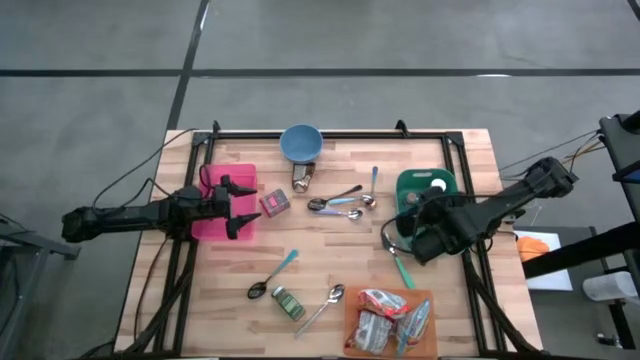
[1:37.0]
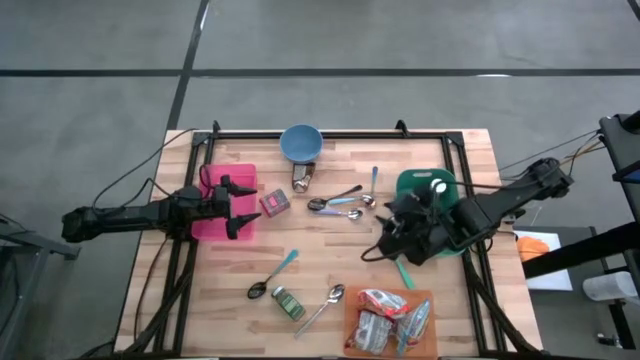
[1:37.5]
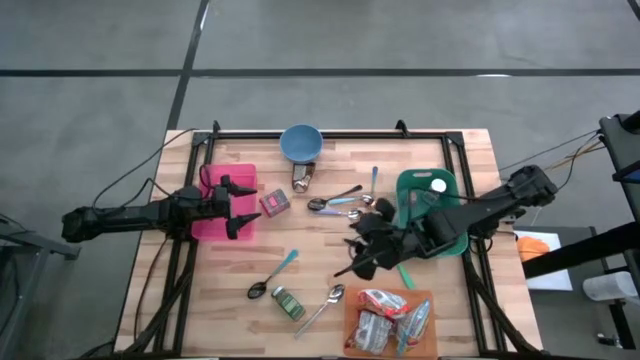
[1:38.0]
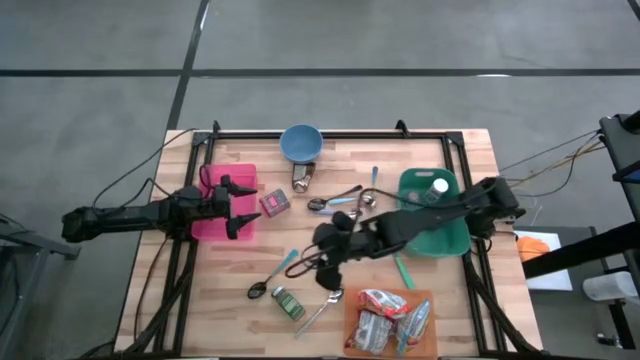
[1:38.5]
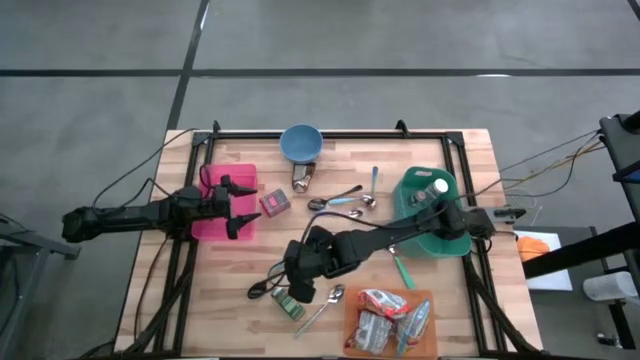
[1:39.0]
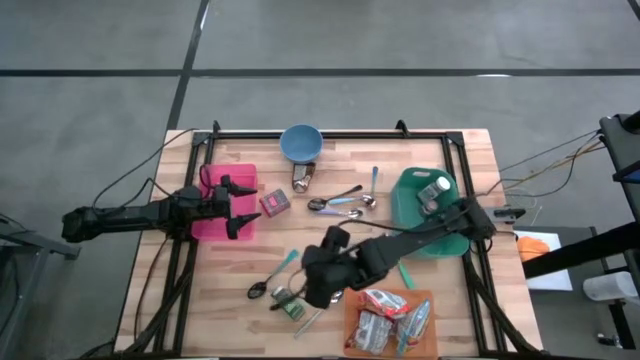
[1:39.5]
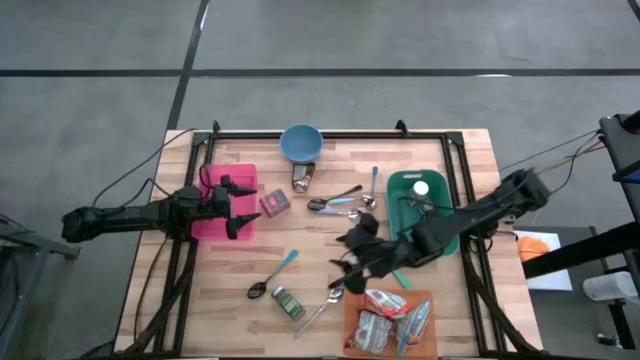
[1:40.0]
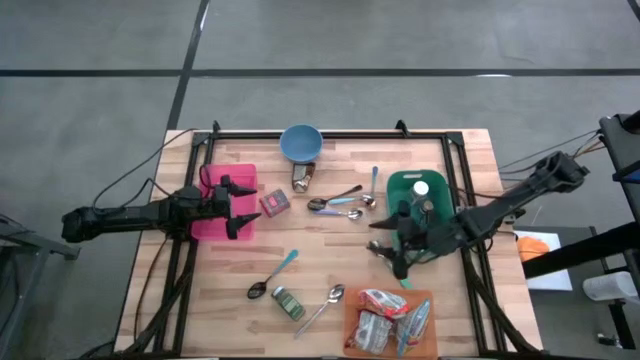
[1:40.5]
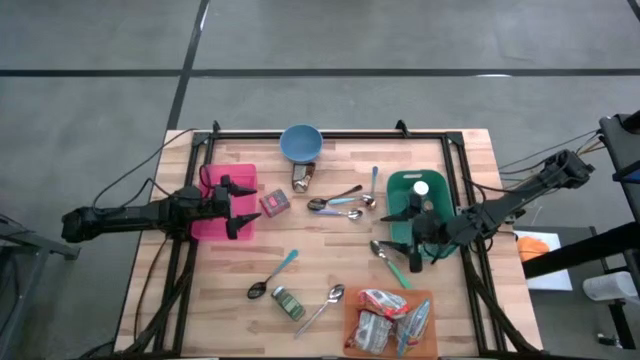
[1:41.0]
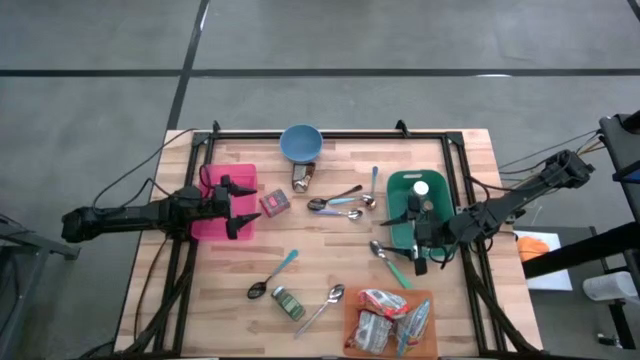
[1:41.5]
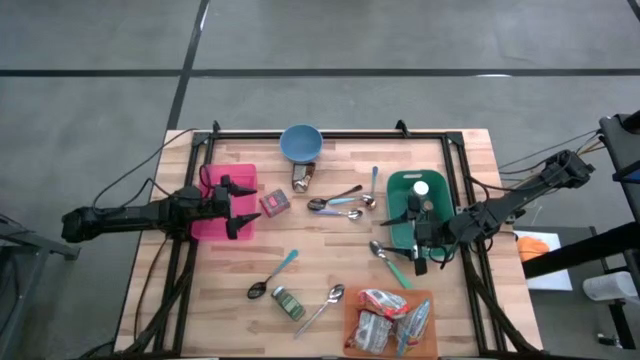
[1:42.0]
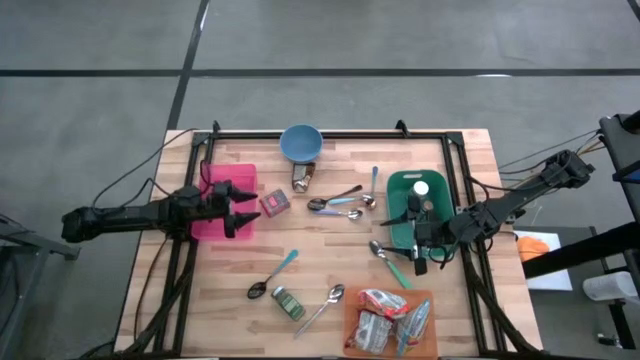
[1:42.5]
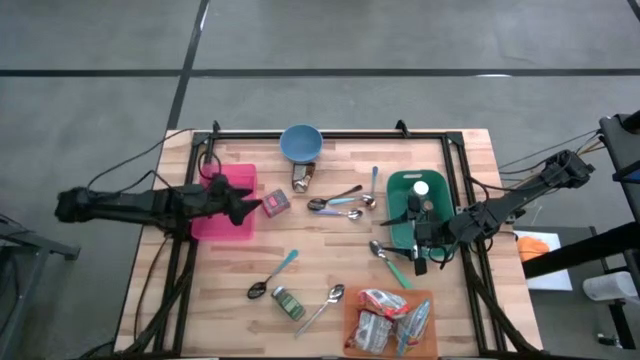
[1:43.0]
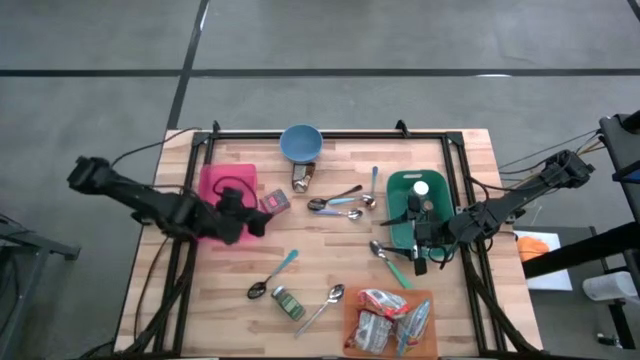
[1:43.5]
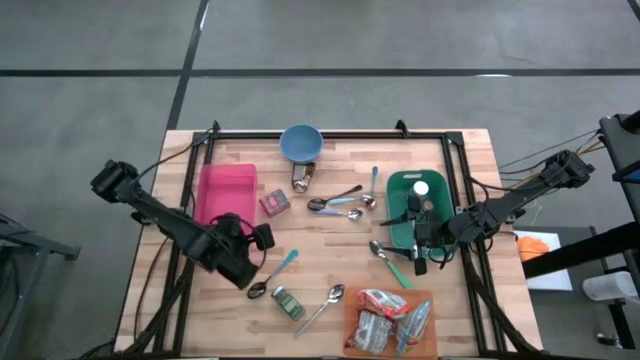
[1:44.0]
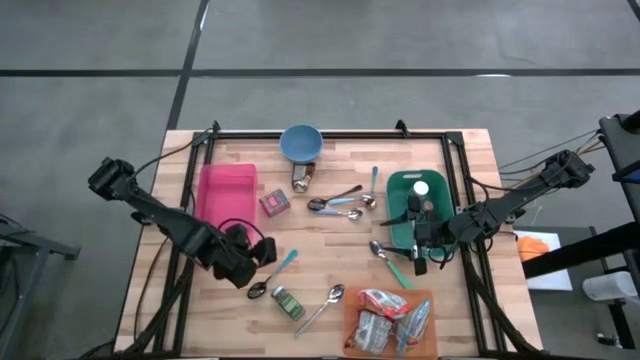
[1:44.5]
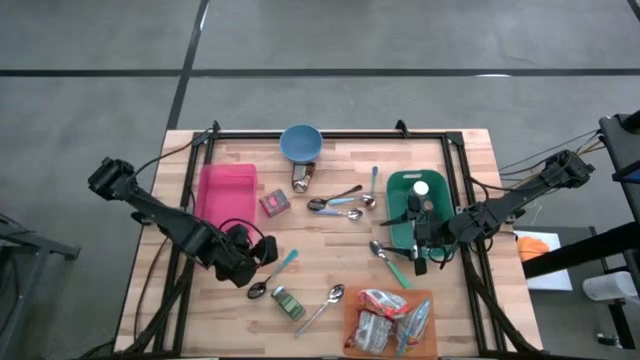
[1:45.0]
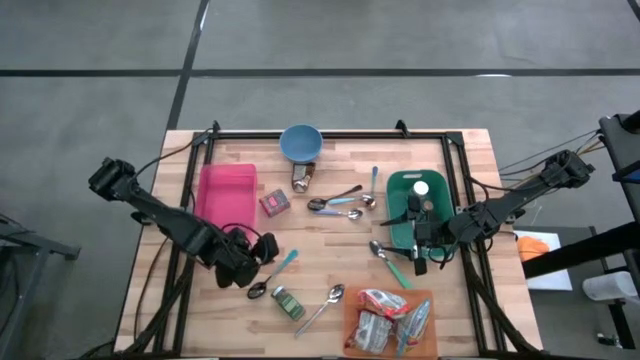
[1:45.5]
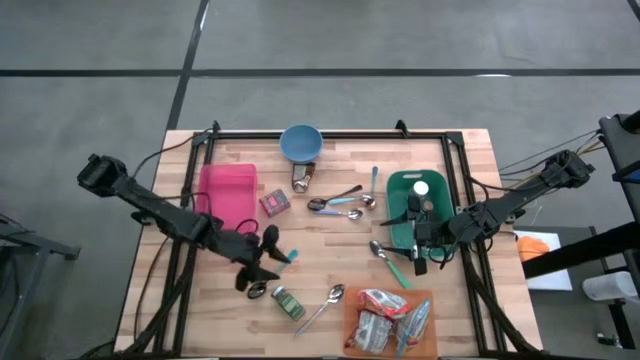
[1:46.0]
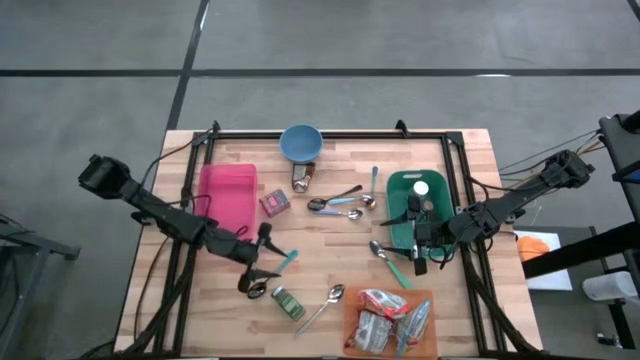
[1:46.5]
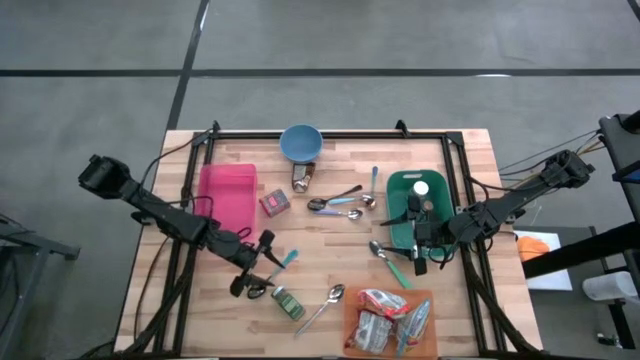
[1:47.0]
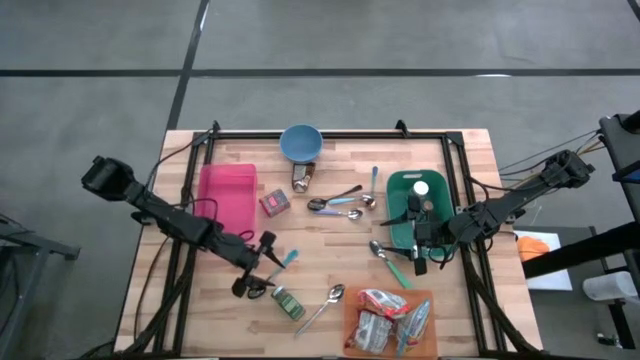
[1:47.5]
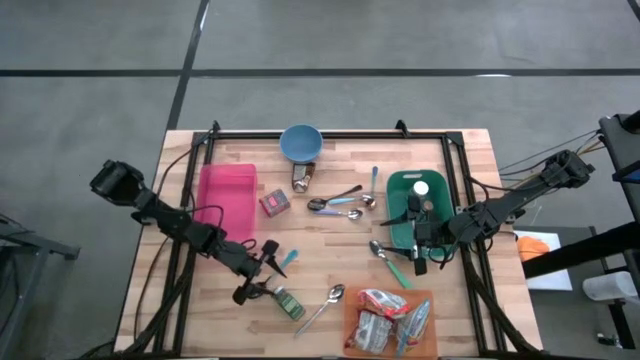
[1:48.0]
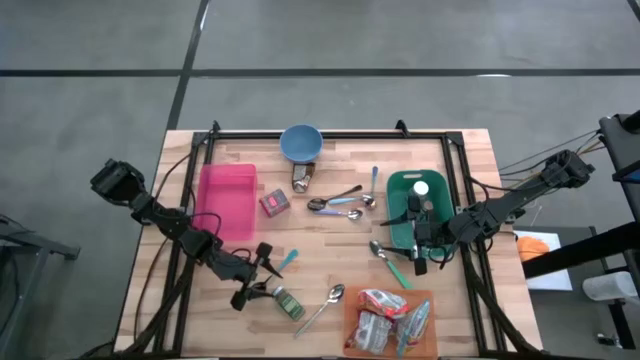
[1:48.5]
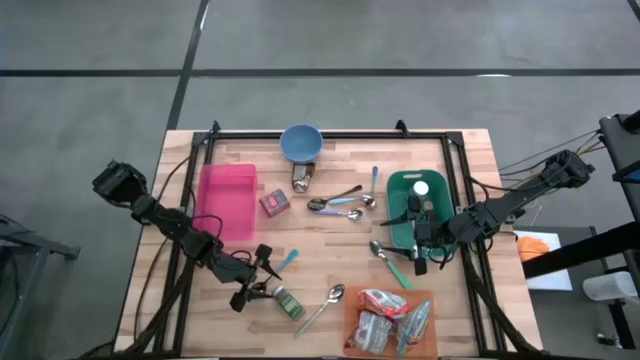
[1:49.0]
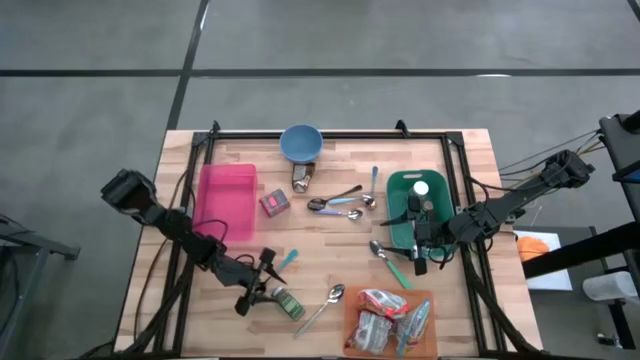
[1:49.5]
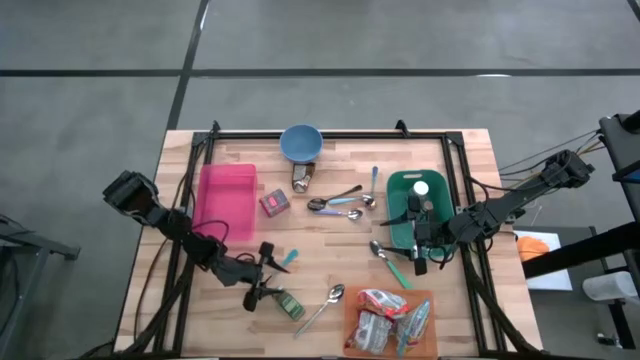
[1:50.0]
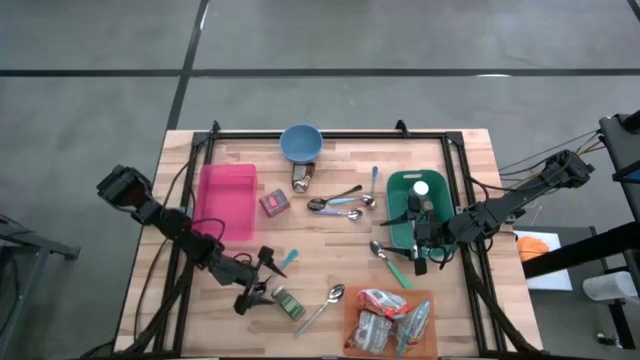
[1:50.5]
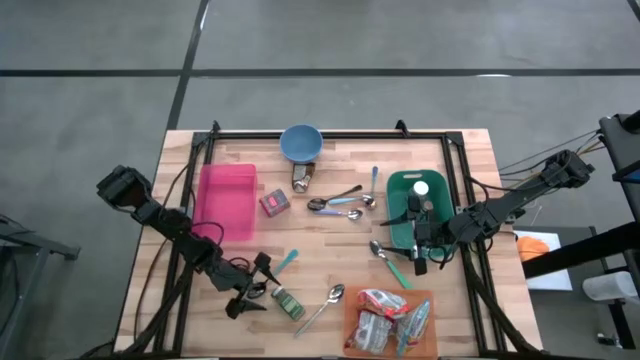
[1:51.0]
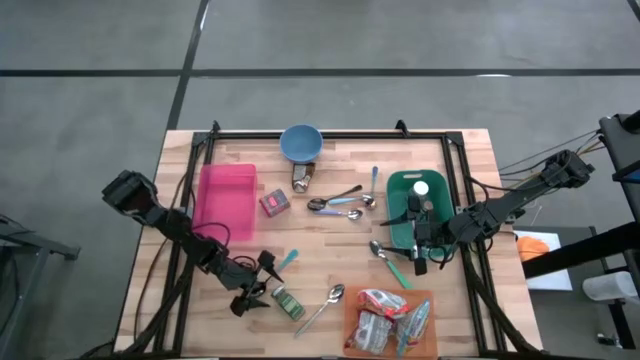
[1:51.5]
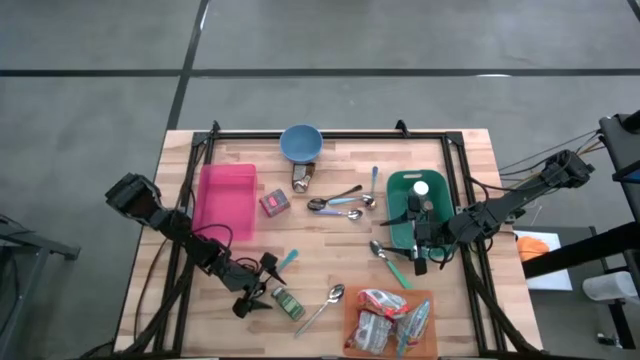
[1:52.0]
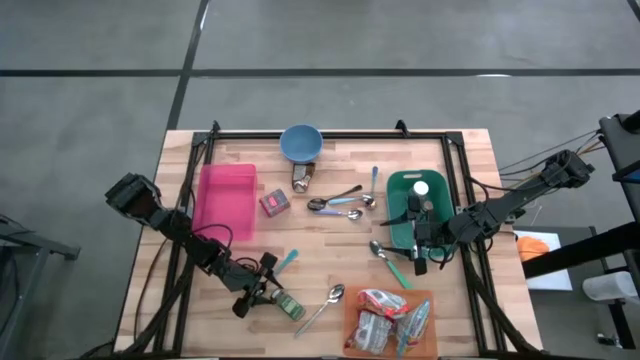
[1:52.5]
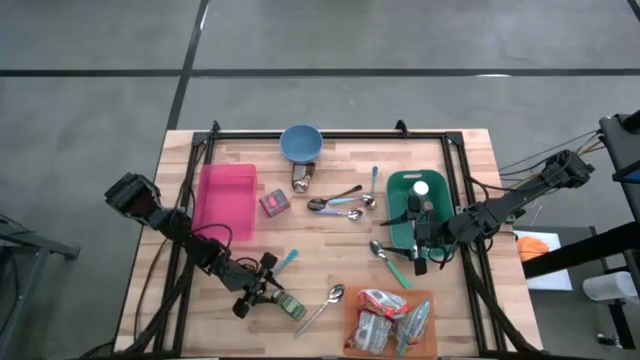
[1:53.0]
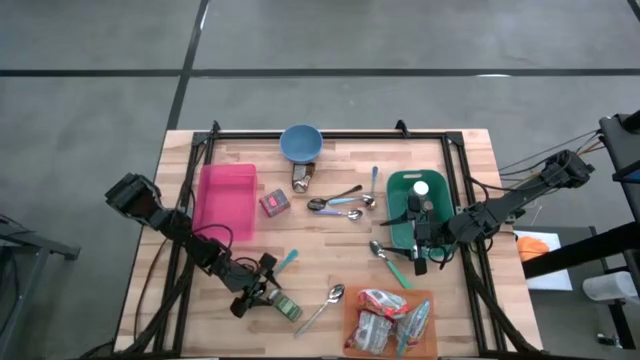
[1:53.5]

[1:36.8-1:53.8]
Put the green seasoning bottle into the green bin
